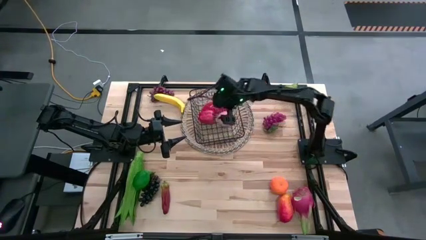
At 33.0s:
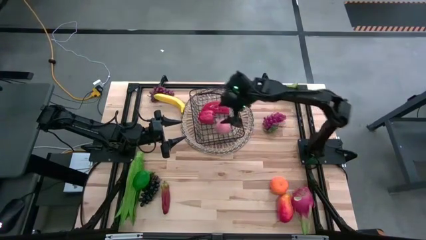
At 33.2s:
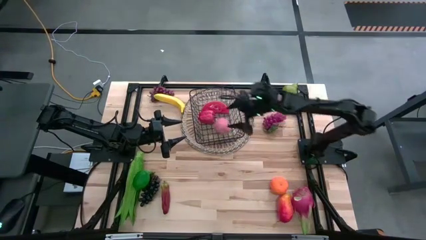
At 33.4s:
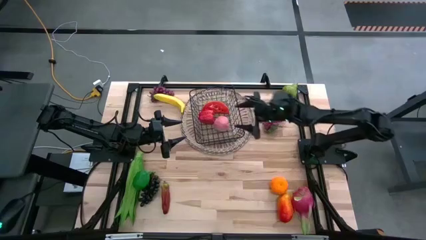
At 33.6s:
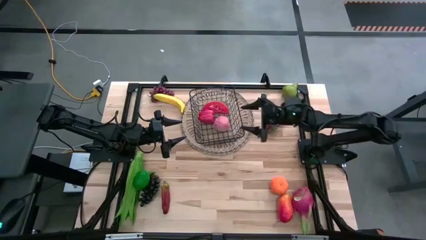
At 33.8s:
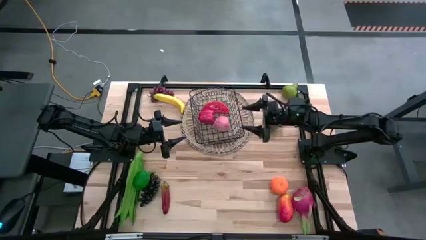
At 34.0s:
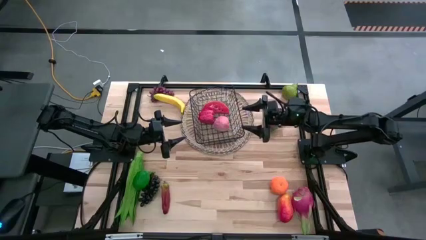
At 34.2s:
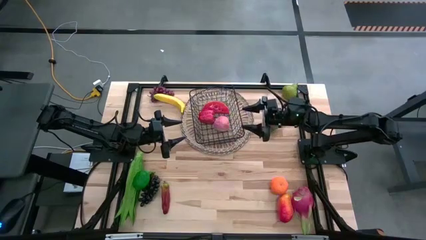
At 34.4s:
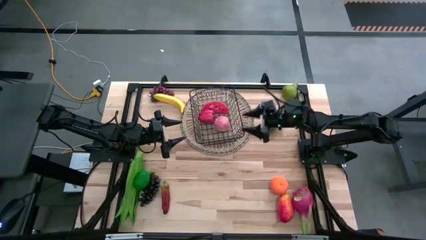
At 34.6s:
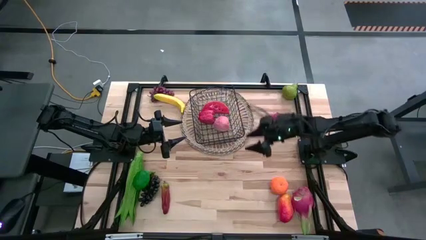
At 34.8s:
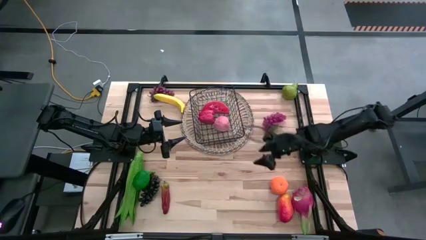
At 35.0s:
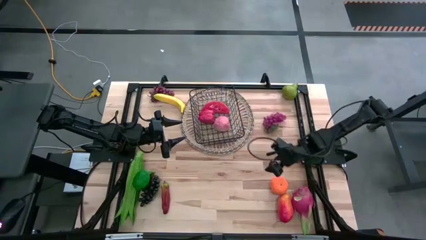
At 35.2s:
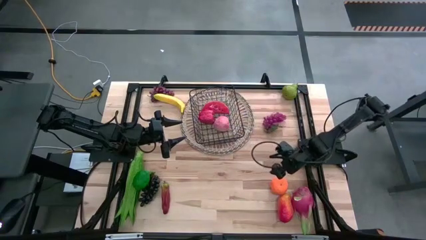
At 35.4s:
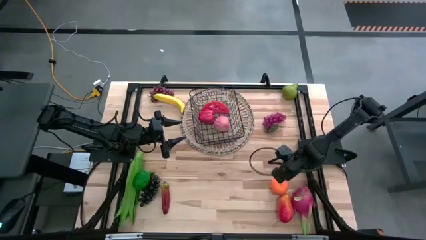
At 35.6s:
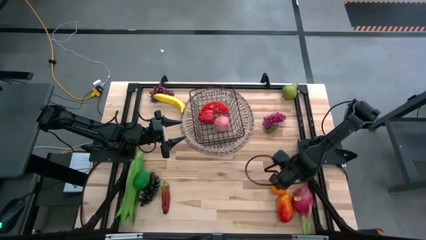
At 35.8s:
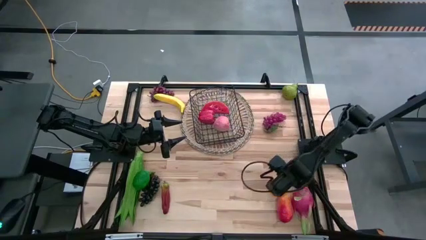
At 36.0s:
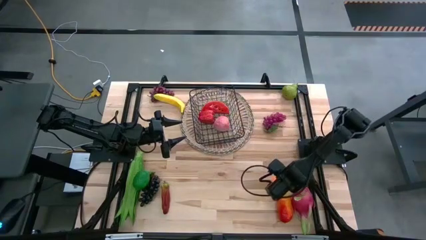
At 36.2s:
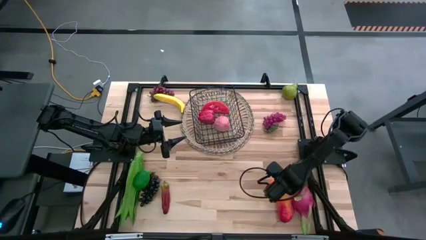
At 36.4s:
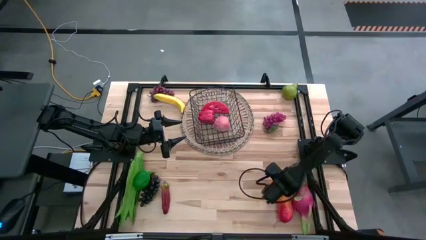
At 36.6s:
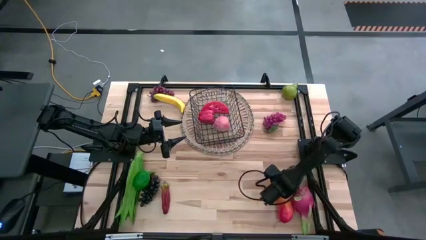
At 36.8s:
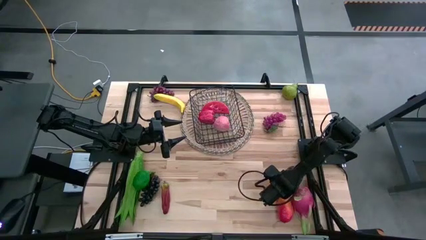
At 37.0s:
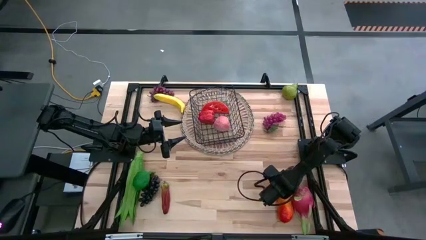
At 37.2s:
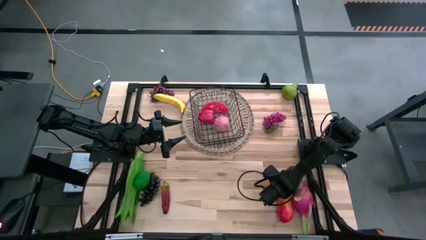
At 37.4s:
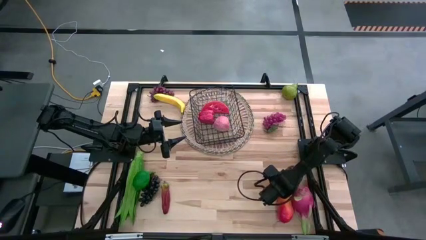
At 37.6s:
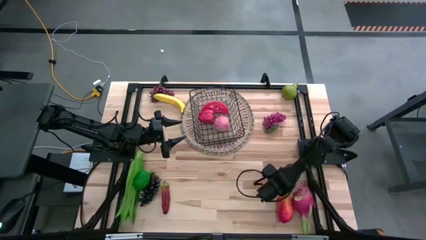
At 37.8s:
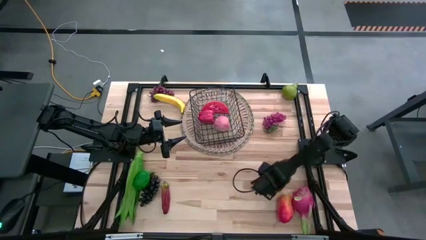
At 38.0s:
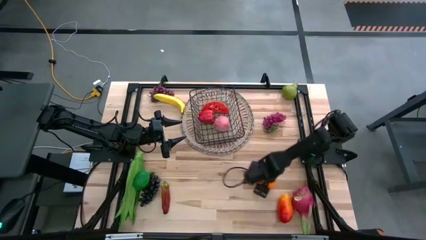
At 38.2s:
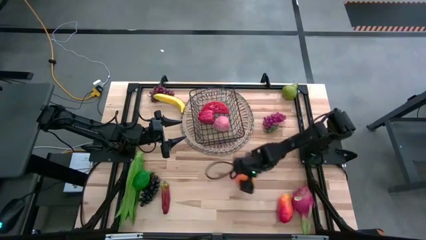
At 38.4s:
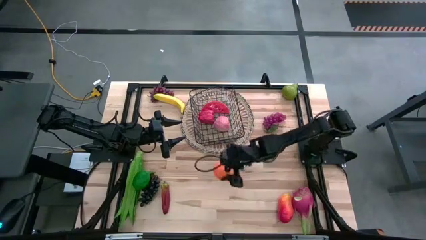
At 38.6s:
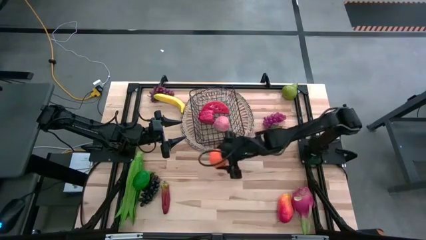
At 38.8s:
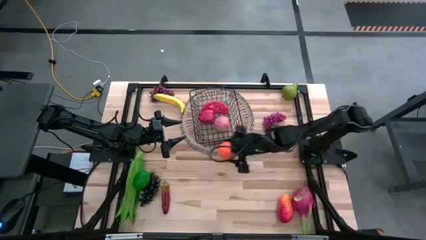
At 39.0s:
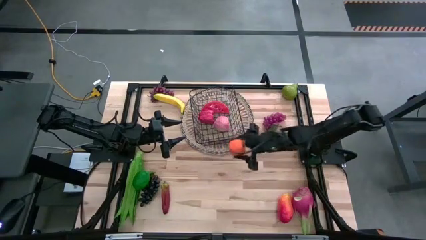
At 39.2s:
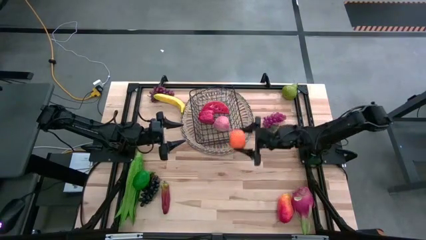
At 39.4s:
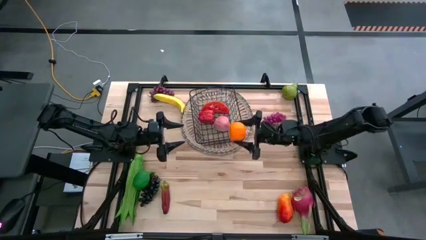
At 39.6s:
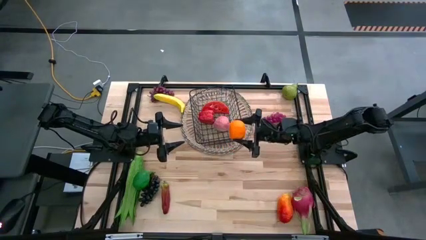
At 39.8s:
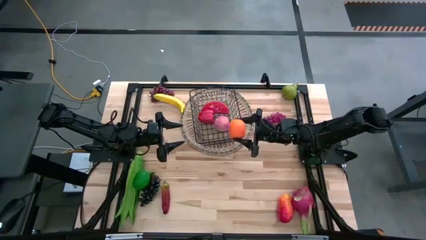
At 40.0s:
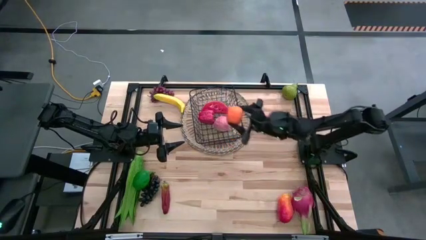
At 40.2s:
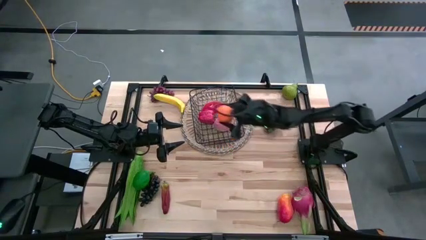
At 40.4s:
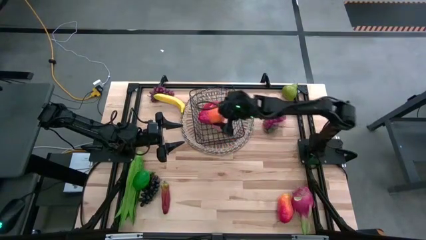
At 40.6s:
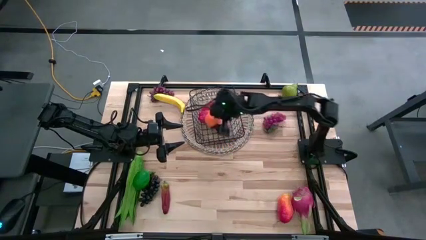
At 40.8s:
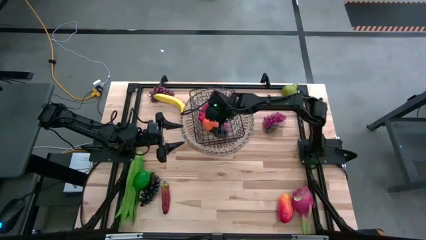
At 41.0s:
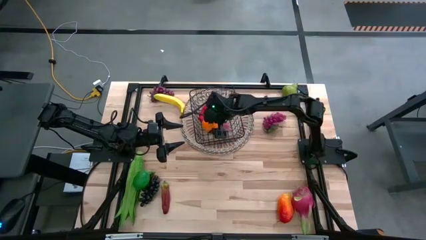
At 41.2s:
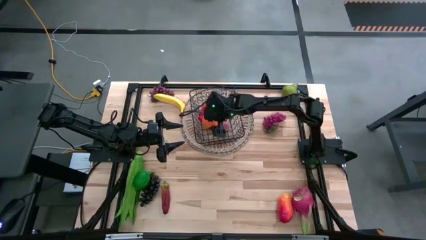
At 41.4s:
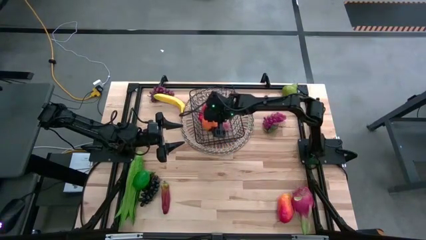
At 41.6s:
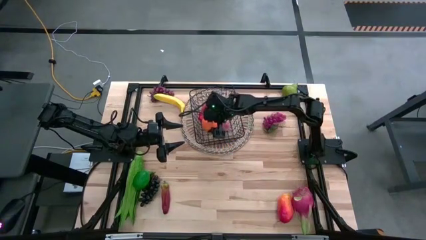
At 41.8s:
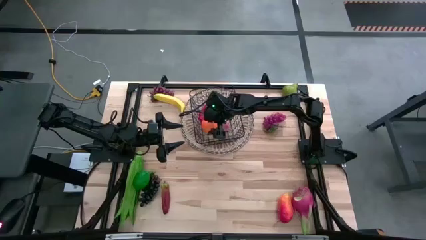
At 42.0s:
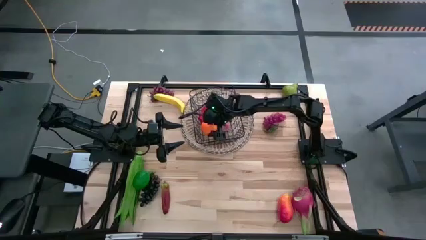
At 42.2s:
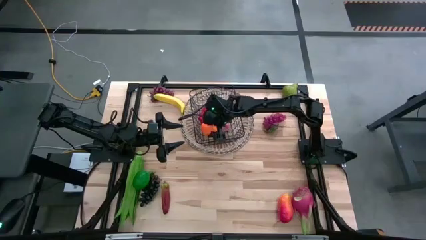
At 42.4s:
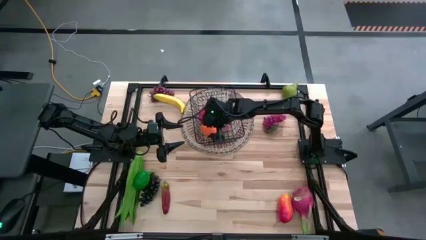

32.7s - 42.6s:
Task: Build produce basket
Put the orange into the black wire basket

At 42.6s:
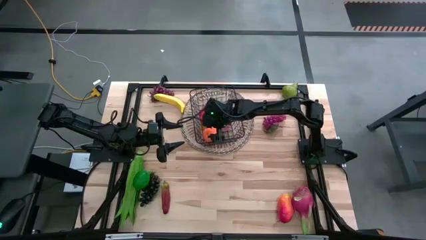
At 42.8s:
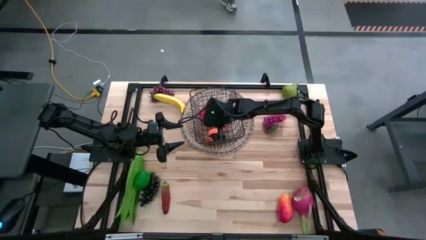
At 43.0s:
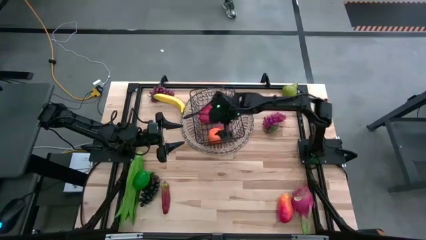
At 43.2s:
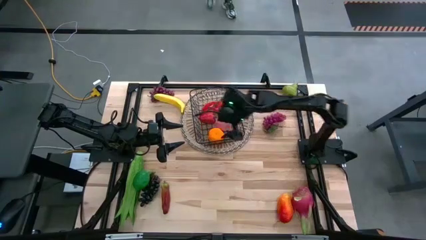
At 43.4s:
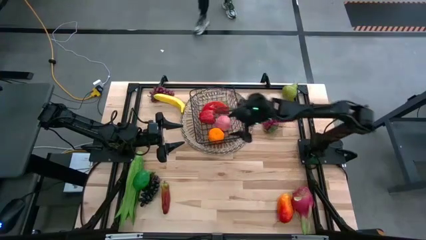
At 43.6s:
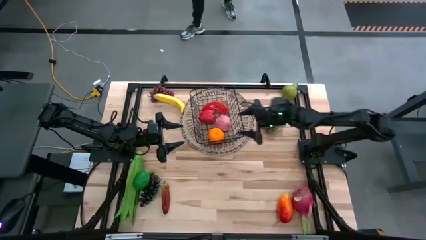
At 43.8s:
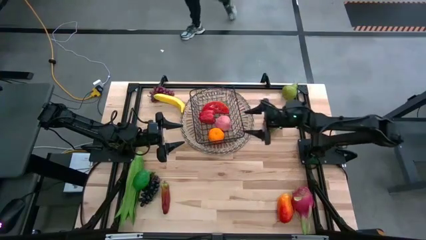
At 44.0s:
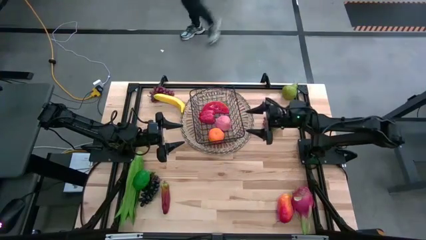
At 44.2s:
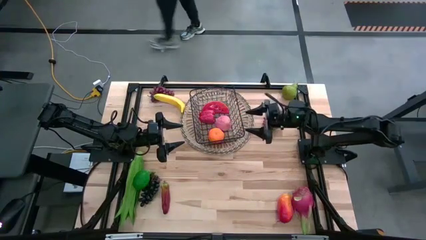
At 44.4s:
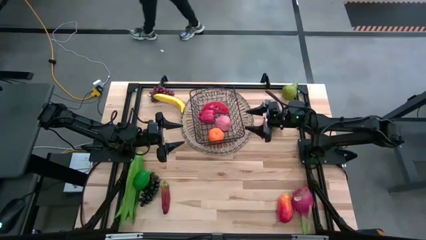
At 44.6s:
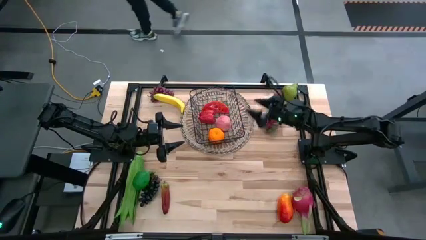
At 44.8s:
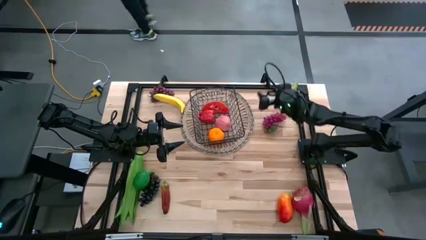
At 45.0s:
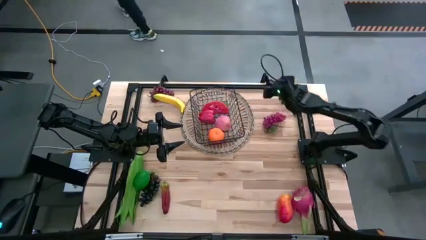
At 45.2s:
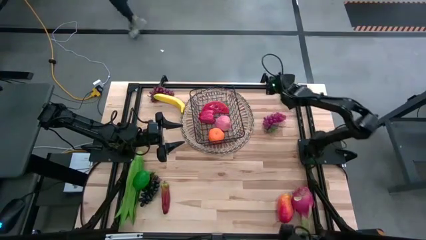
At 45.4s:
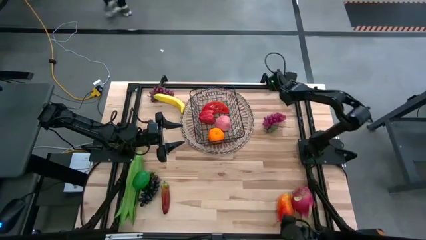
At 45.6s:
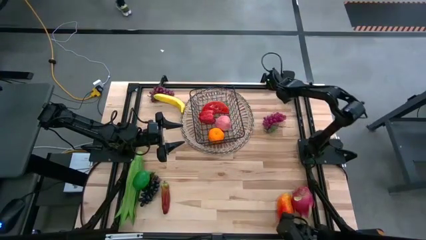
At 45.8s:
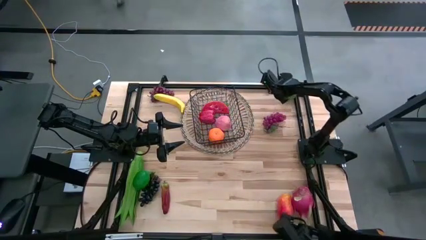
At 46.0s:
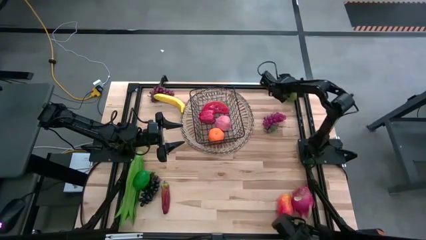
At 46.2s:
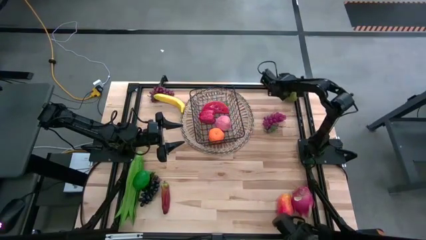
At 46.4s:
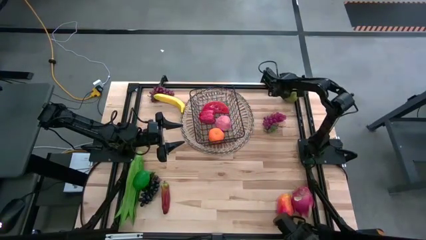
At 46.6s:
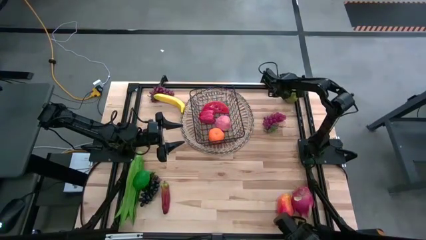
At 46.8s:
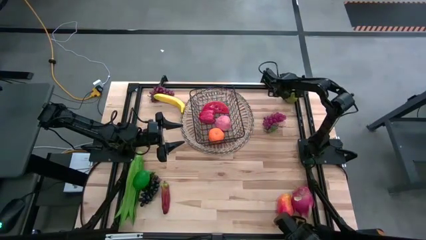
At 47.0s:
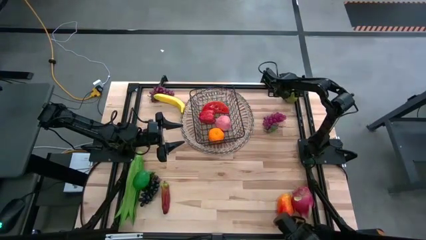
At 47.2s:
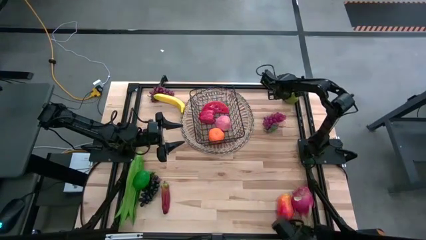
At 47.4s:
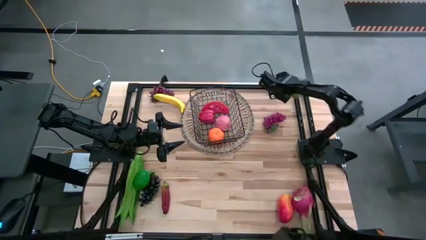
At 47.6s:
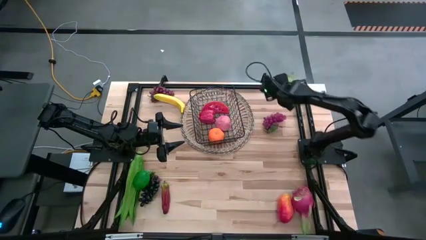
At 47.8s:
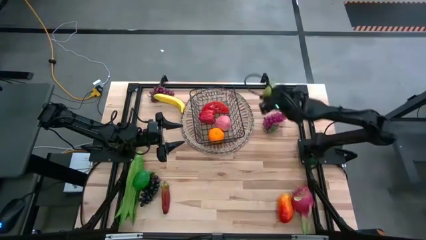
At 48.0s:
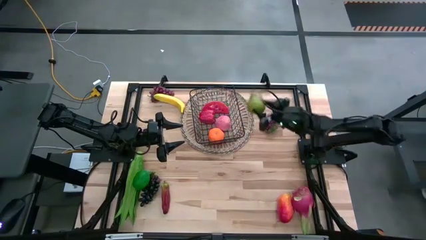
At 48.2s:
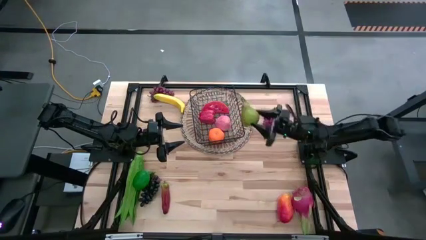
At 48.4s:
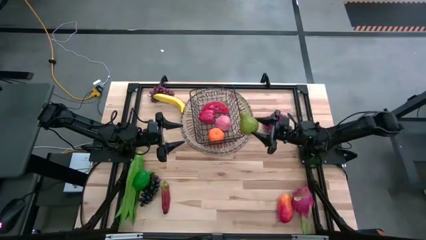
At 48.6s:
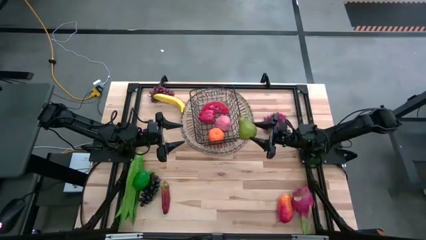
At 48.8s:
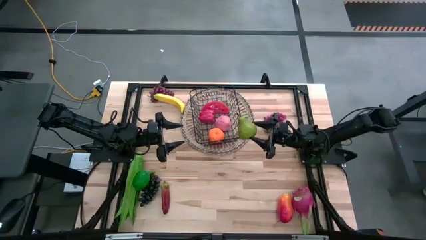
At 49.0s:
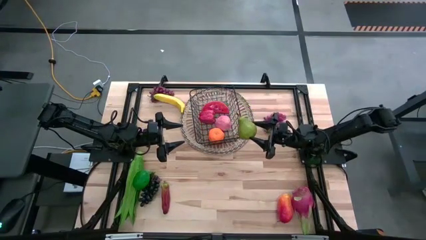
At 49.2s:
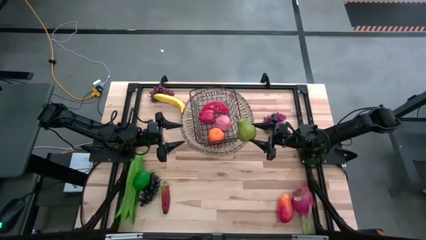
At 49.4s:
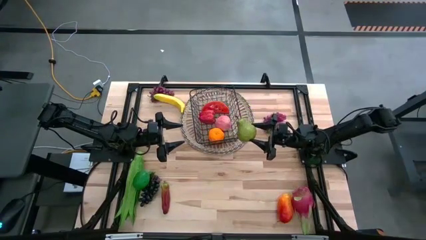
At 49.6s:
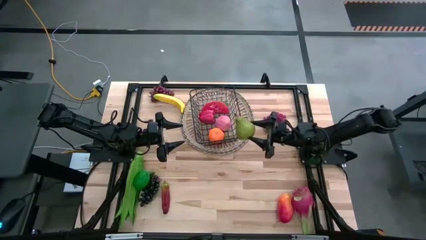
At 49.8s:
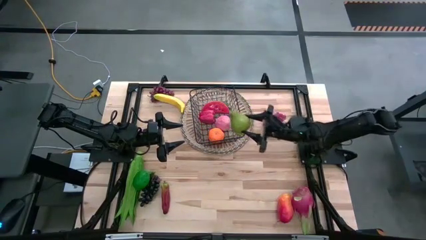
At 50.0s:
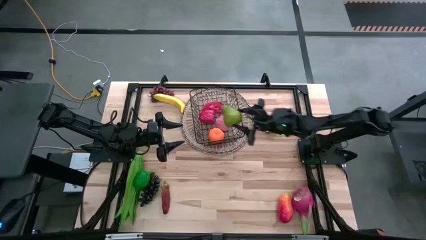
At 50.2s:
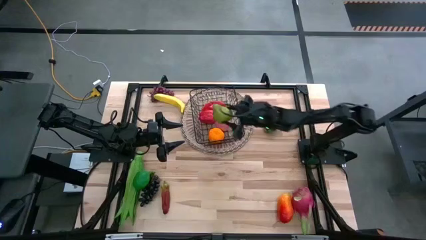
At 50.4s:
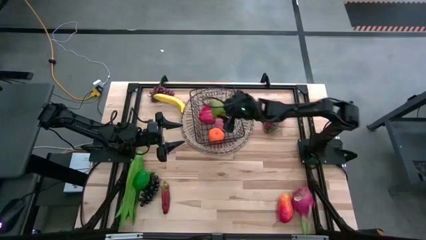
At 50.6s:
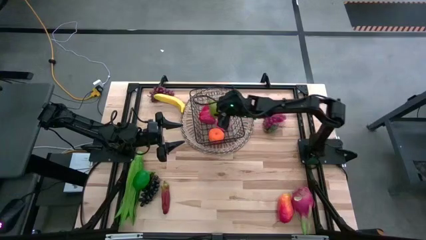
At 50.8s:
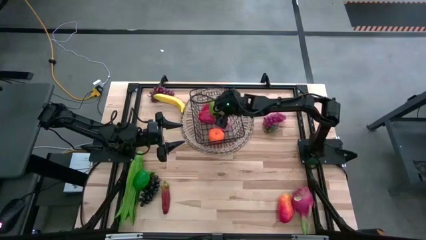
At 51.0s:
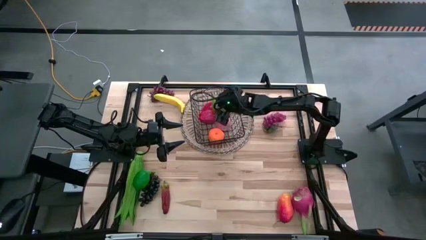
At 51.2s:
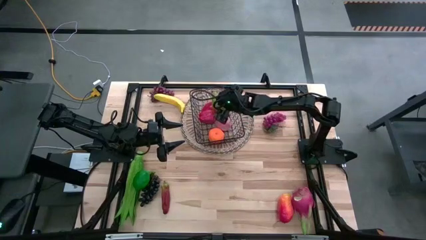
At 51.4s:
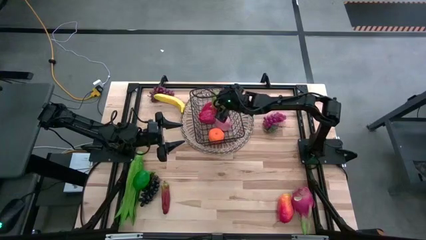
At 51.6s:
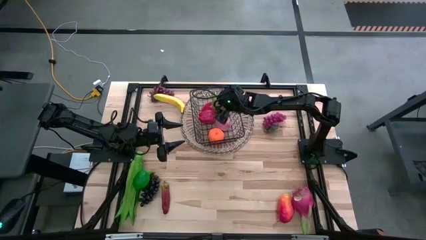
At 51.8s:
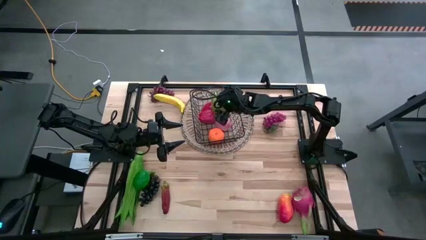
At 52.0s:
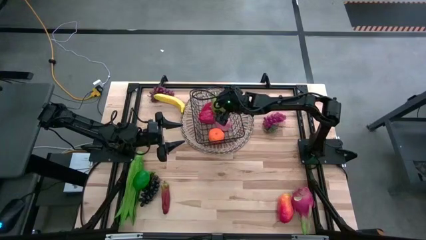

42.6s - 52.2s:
Put the green pear into the black wire basket
